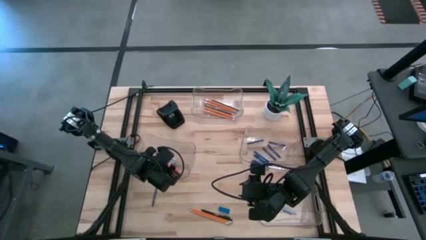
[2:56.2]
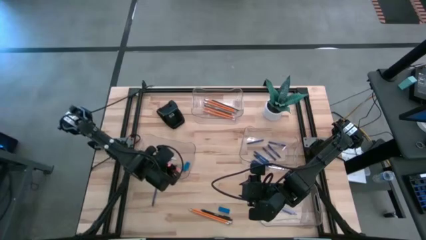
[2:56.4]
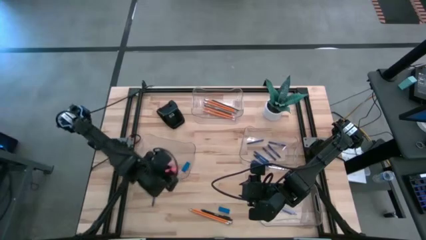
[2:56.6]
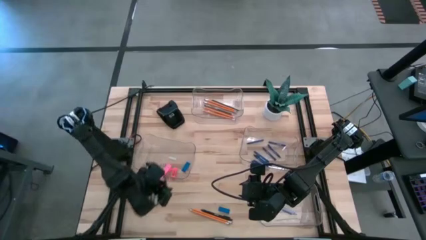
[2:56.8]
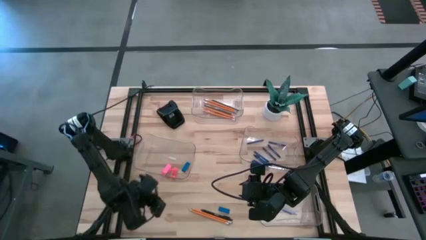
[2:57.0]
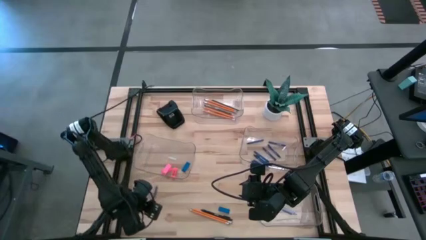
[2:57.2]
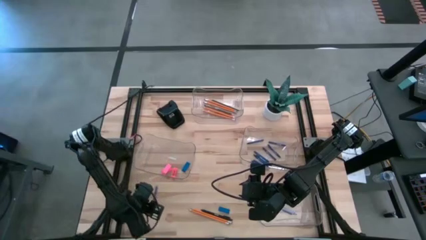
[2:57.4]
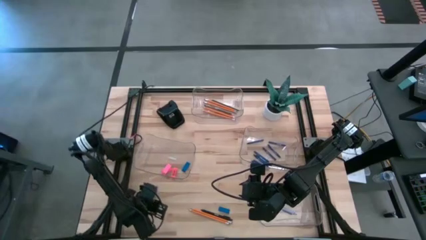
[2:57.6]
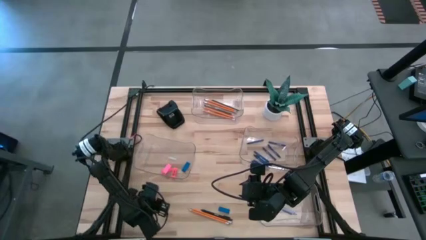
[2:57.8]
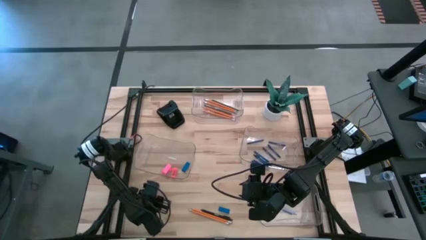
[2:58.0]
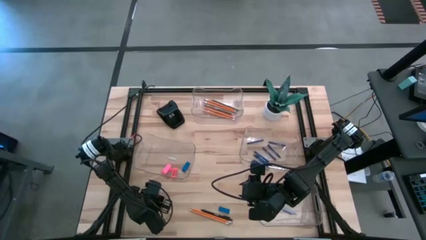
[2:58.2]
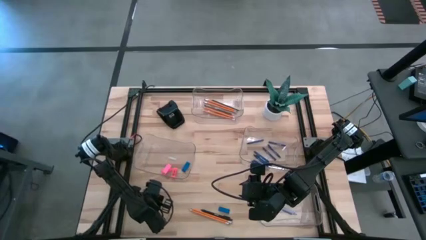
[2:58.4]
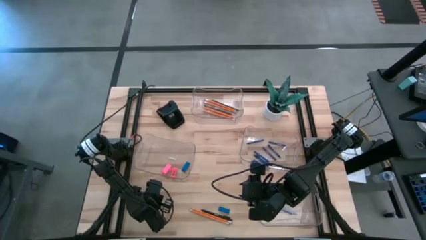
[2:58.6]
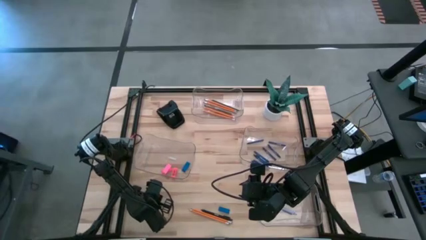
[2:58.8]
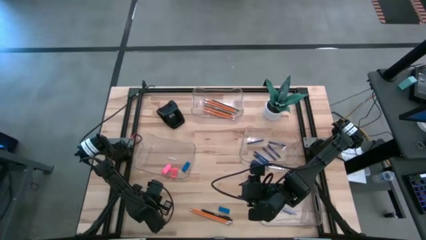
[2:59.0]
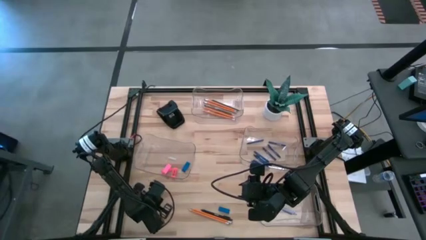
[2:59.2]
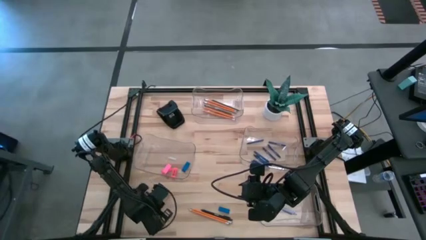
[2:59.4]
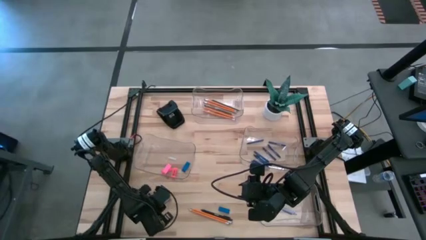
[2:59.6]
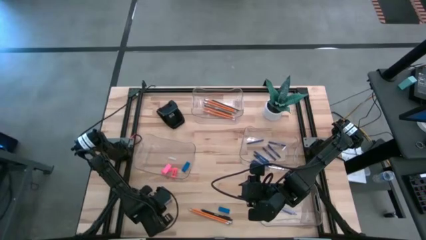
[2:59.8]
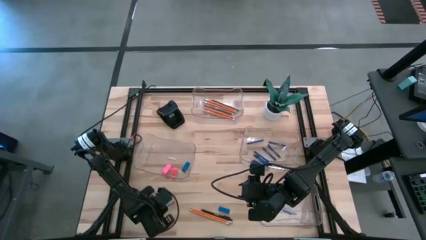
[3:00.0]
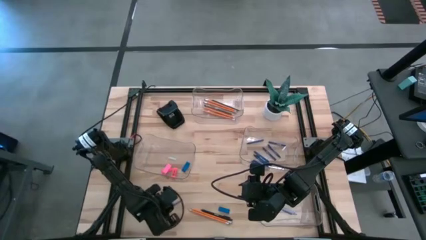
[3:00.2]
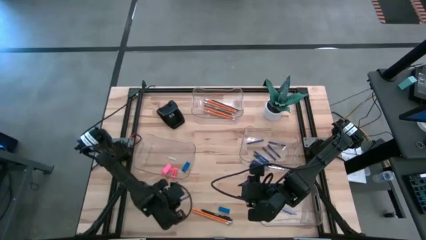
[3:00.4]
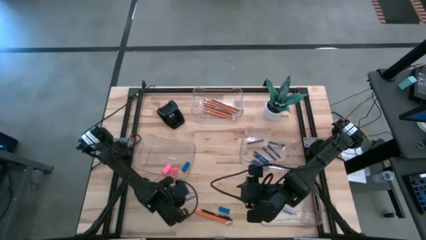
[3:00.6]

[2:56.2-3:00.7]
Task: Sort crayons/erasers/pens/pencils in bins
Put the blue crayon into the middle right transparent bin

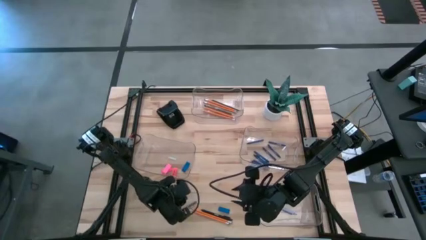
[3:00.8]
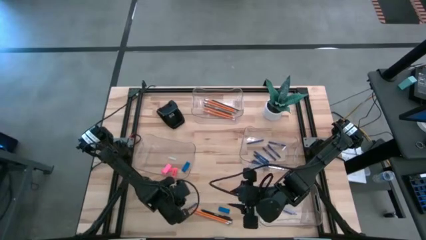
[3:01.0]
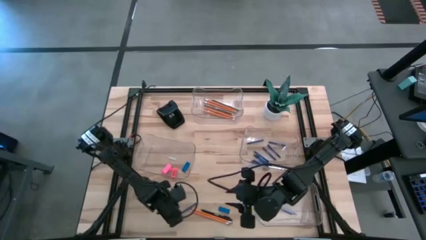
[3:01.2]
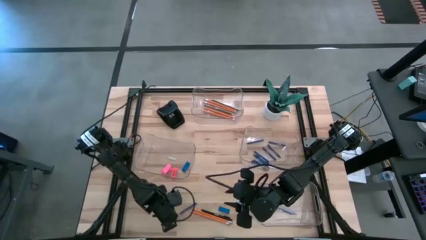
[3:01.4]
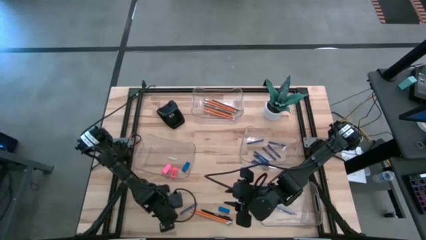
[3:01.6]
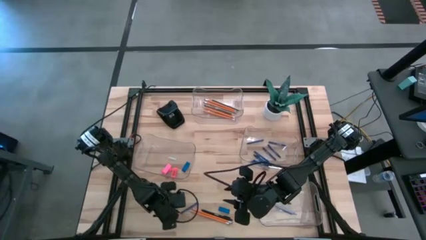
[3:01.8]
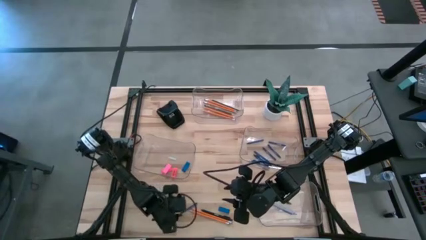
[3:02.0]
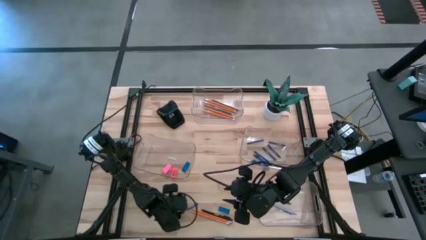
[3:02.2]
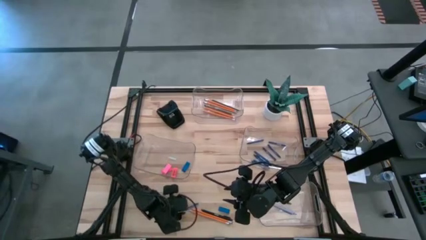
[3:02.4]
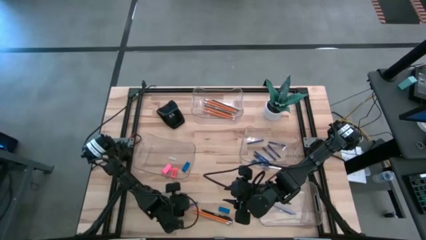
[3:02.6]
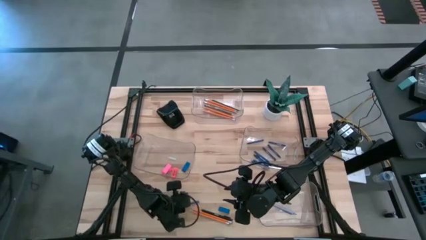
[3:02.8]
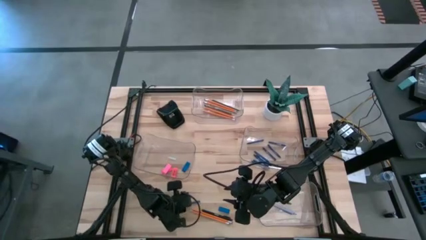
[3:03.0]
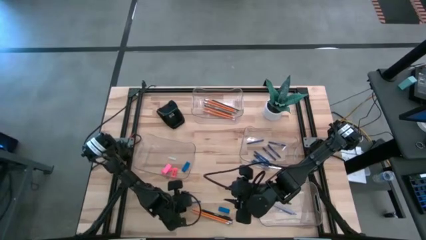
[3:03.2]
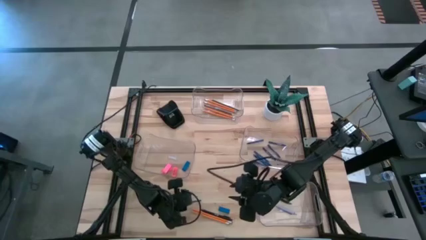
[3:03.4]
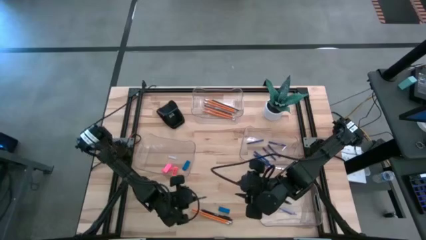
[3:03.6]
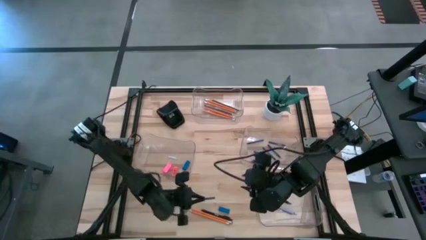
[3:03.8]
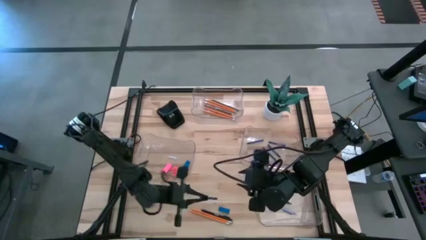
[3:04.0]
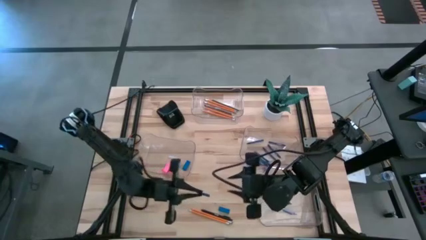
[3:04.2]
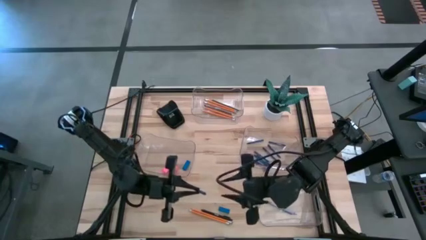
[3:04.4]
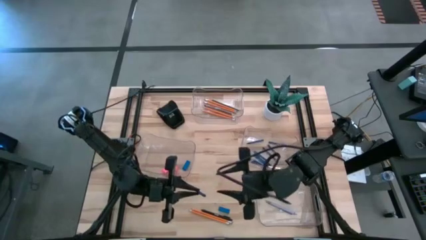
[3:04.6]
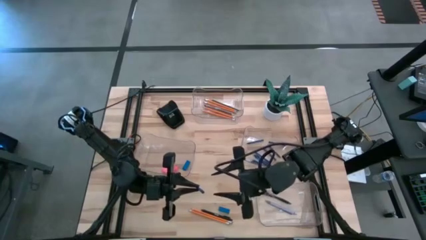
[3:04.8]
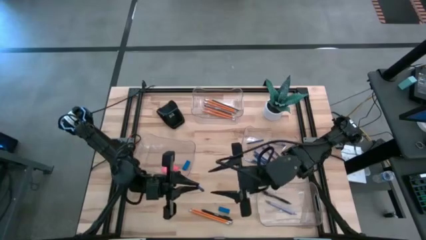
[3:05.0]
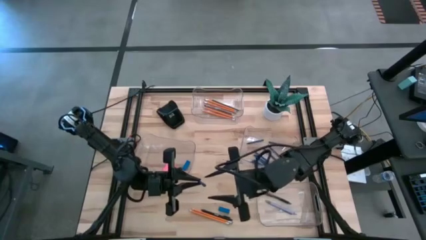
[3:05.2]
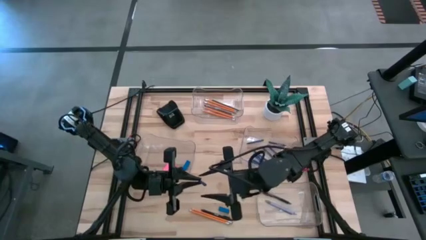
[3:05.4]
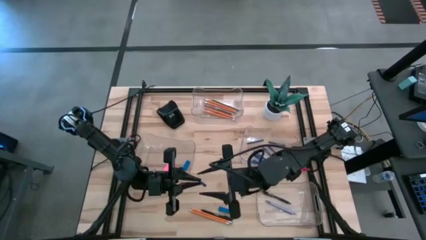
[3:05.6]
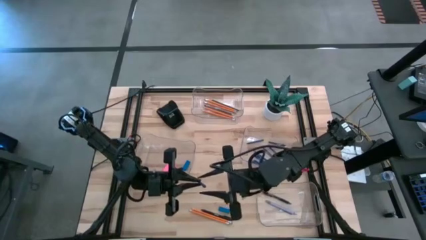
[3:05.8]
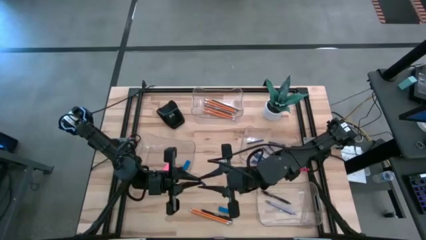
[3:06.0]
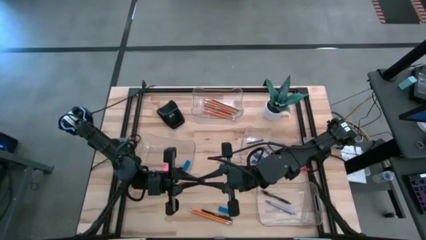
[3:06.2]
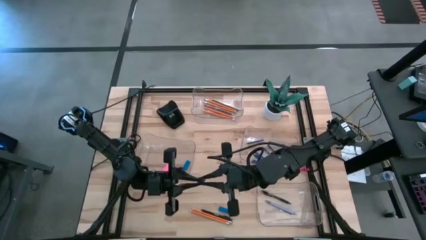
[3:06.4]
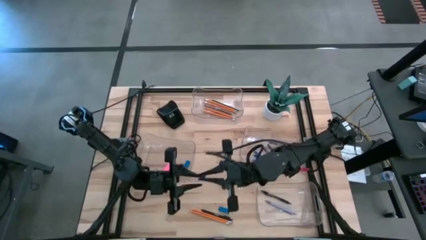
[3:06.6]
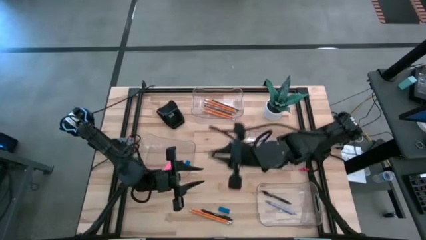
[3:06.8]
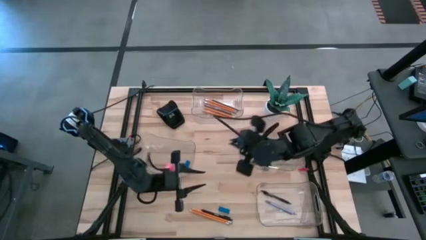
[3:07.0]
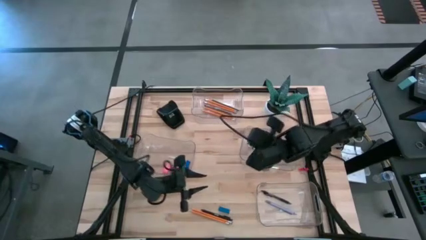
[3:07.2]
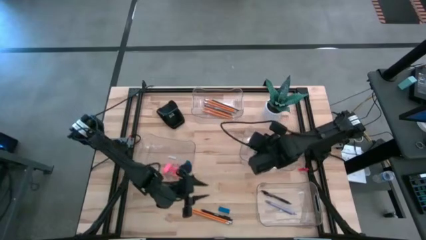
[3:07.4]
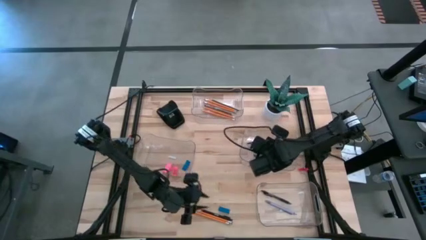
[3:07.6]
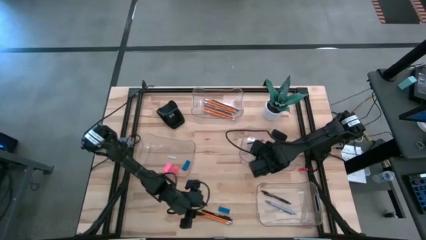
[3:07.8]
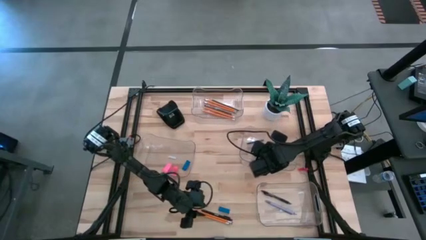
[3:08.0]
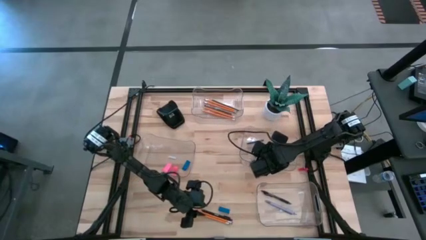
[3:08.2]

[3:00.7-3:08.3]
Put the blue crayon into the middle right transparent bin

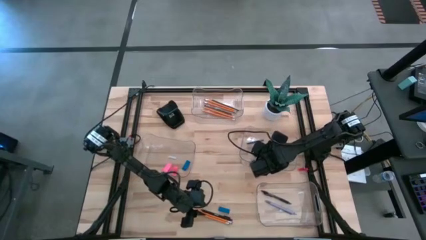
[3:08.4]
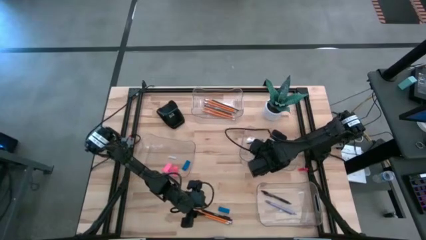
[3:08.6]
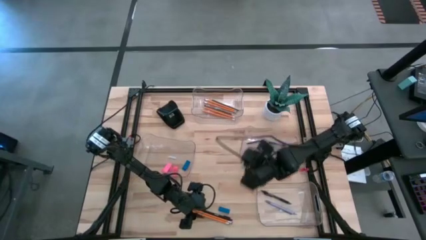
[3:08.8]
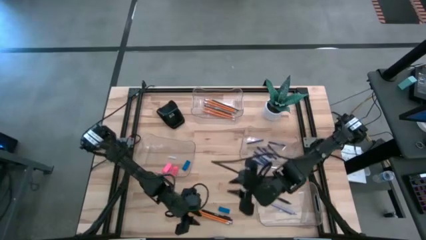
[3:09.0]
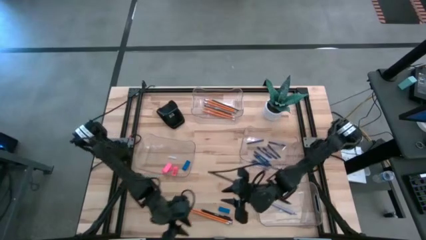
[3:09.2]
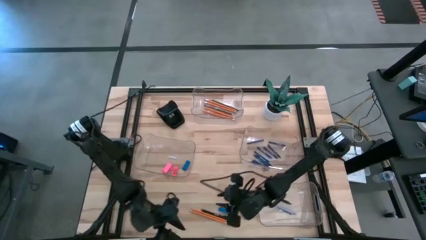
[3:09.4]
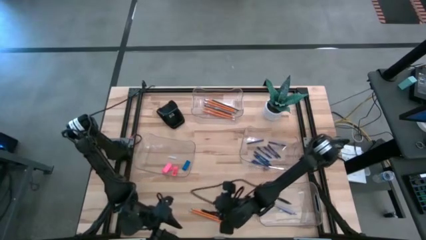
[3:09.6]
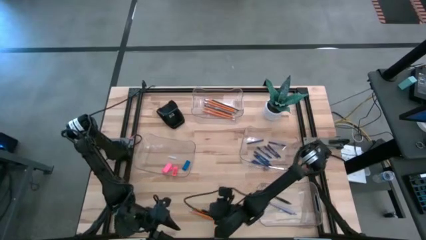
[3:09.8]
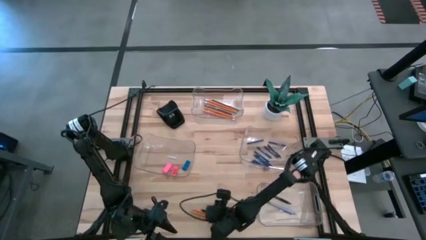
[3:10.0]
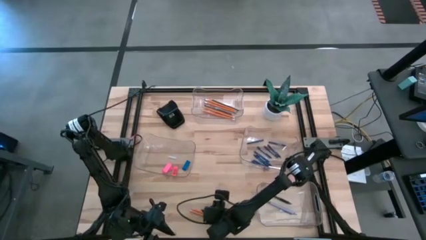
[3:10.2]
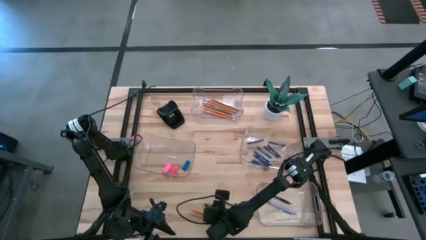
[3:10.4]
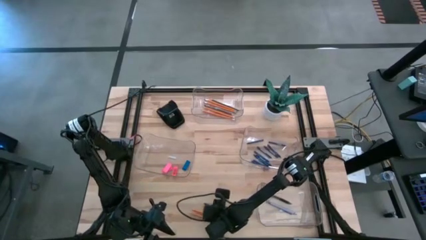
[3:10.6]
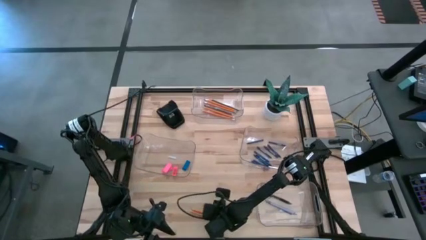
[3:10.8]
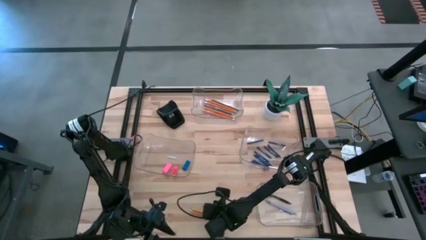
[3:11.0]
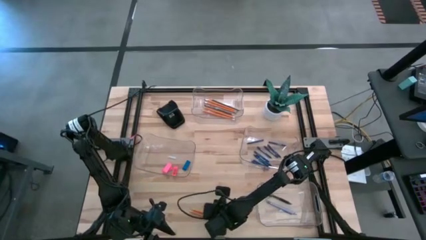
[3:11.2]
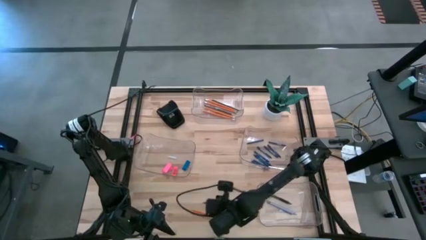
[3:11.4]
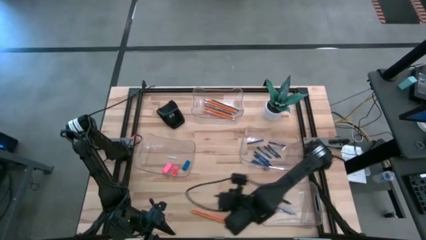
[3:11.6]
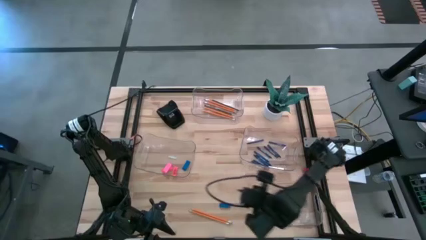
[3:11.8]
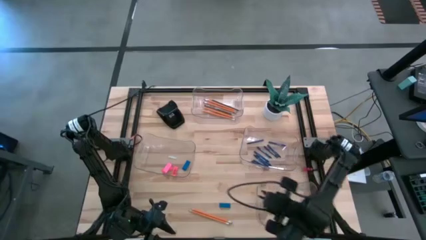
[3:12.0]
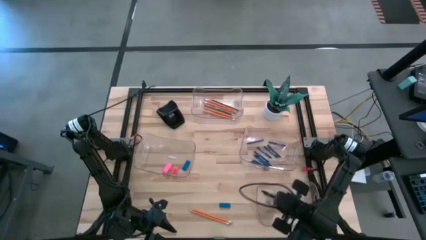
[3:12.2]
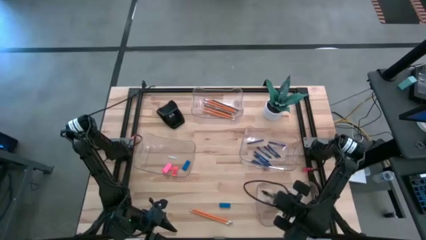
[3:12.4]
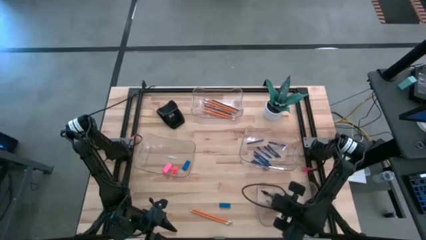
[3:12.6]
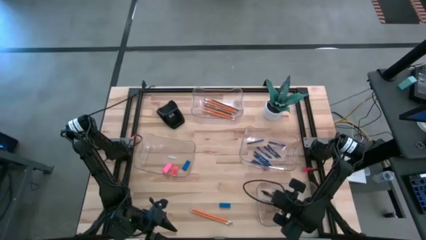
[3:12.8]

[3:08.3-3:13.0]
Put the black pen into the bottom transparent bin
